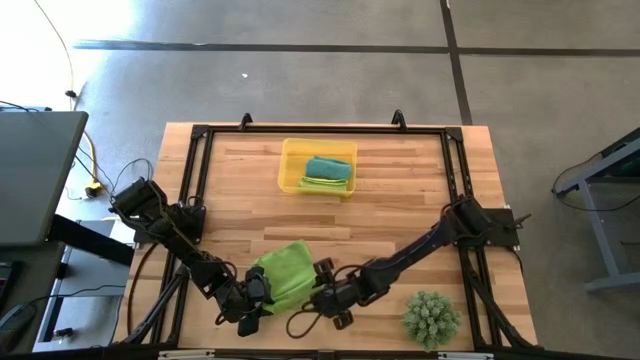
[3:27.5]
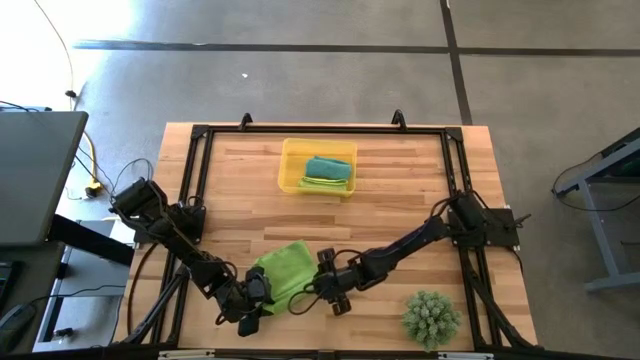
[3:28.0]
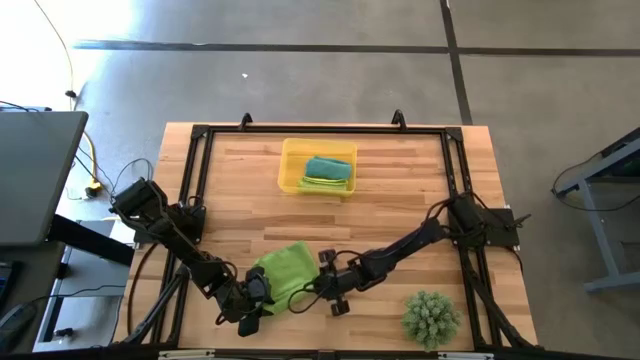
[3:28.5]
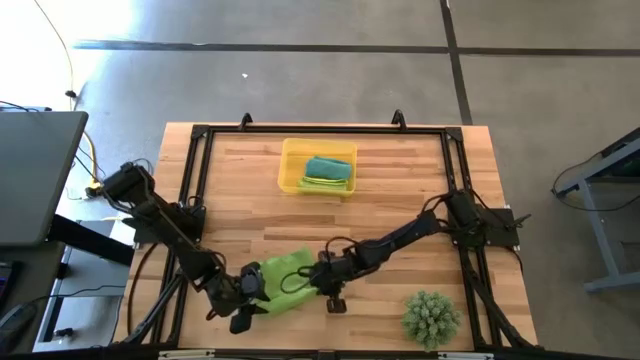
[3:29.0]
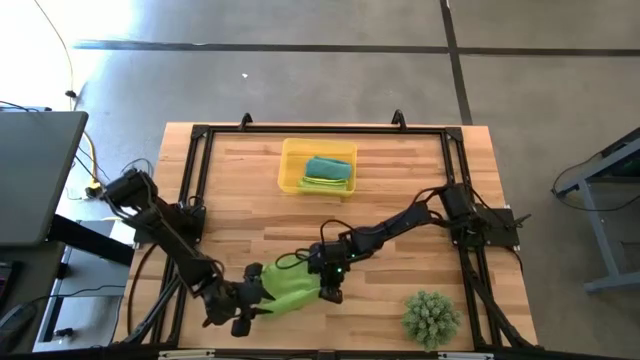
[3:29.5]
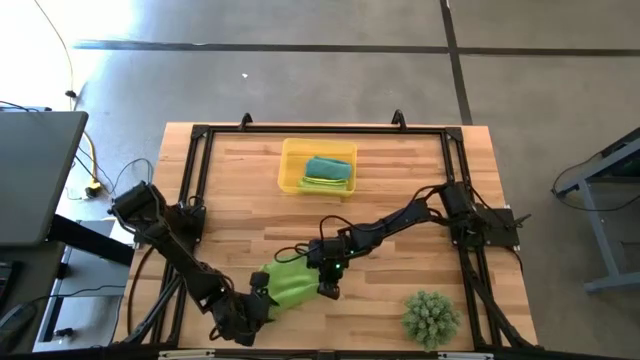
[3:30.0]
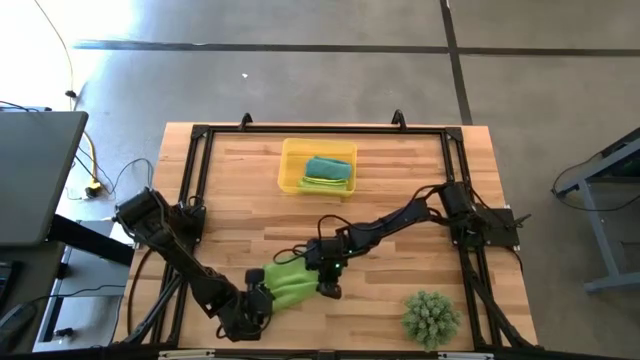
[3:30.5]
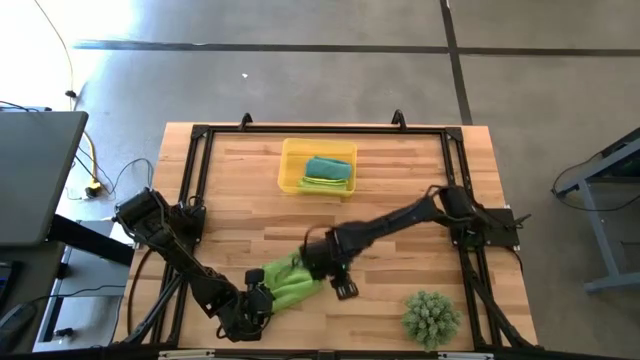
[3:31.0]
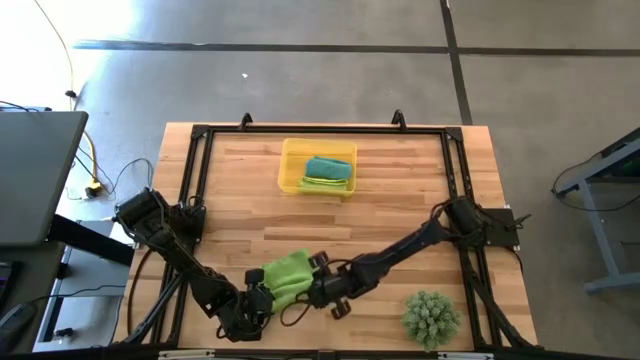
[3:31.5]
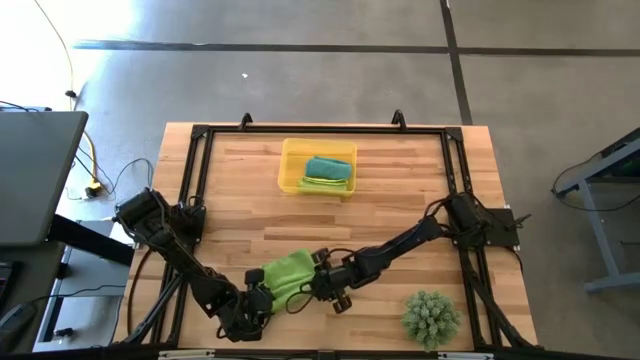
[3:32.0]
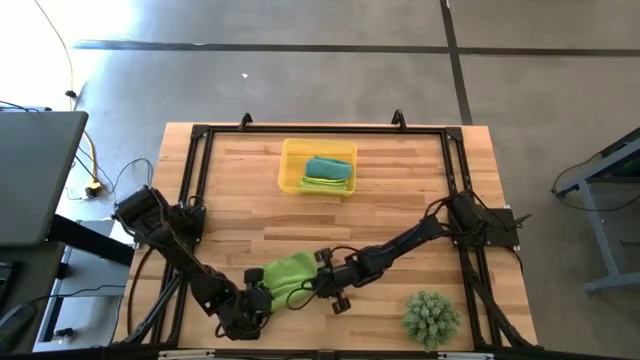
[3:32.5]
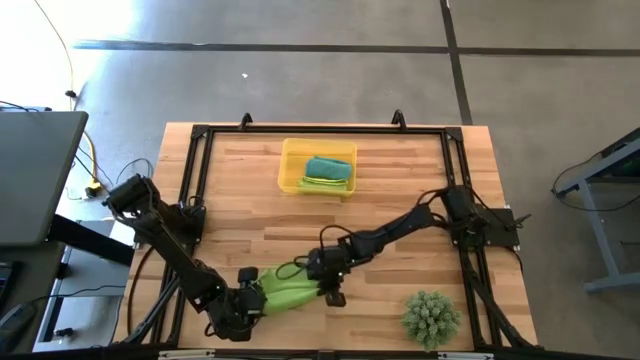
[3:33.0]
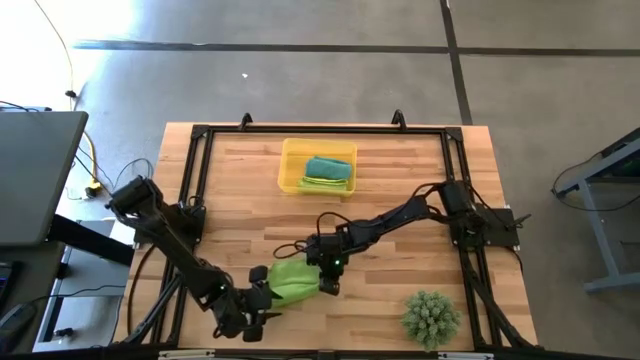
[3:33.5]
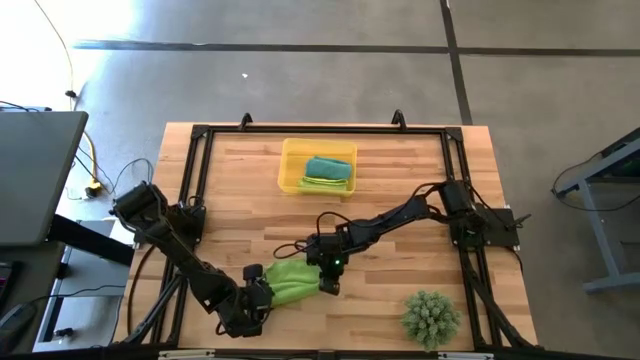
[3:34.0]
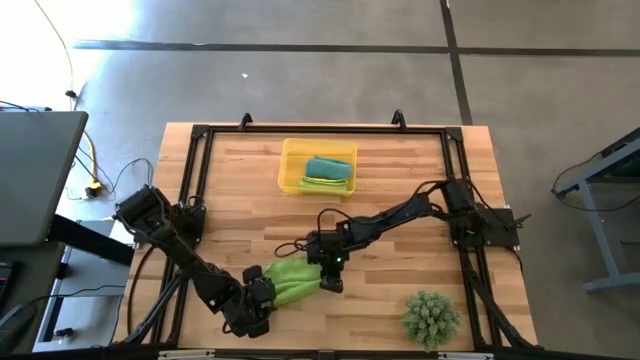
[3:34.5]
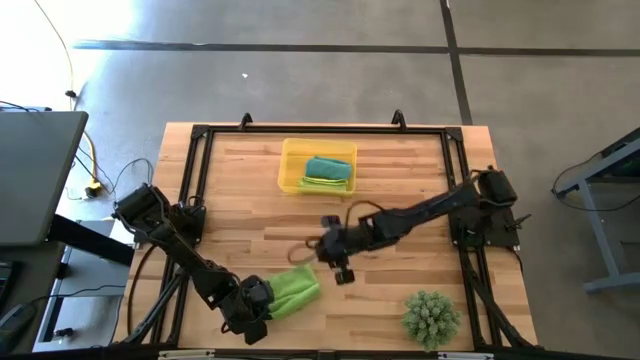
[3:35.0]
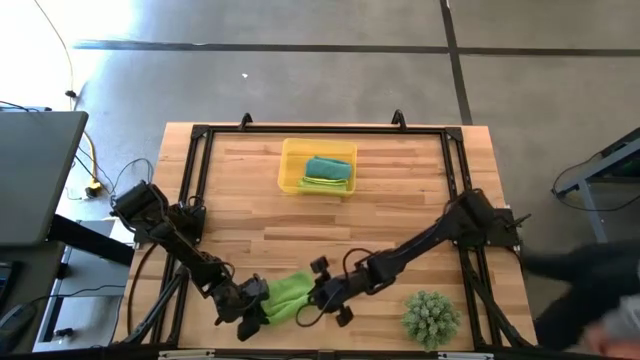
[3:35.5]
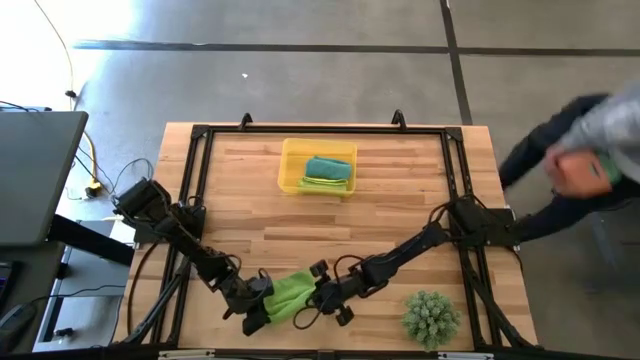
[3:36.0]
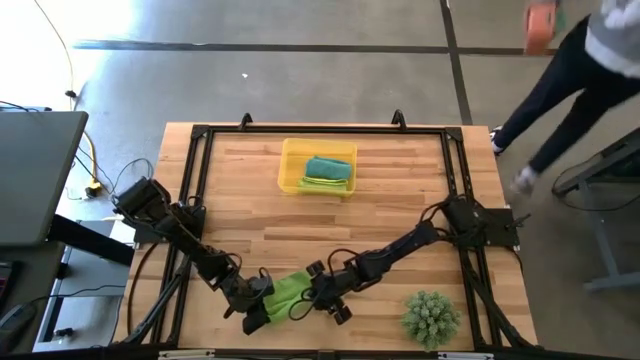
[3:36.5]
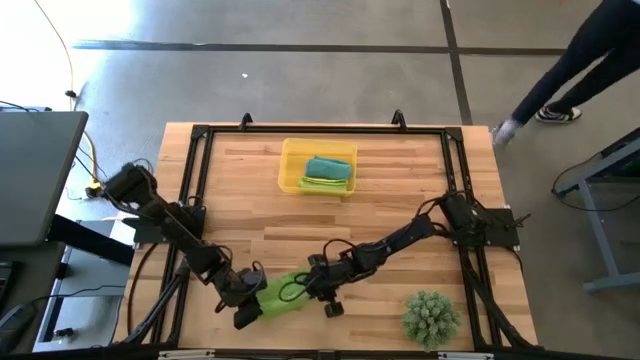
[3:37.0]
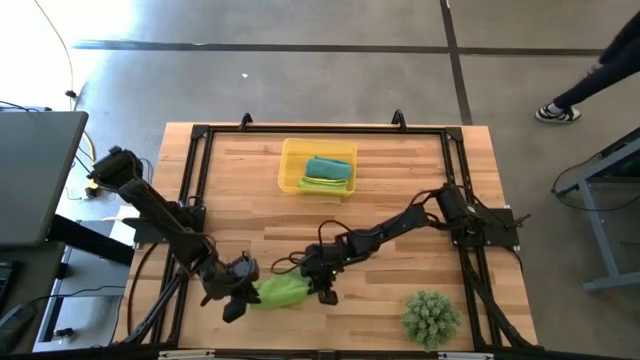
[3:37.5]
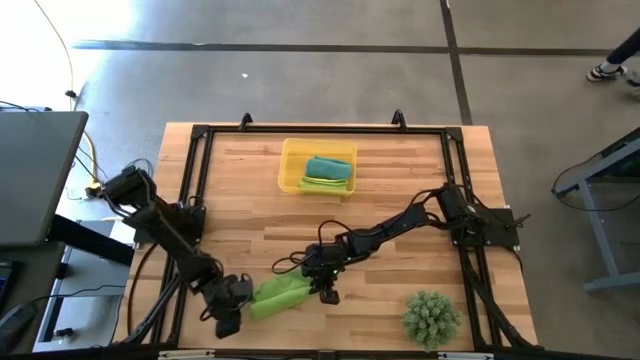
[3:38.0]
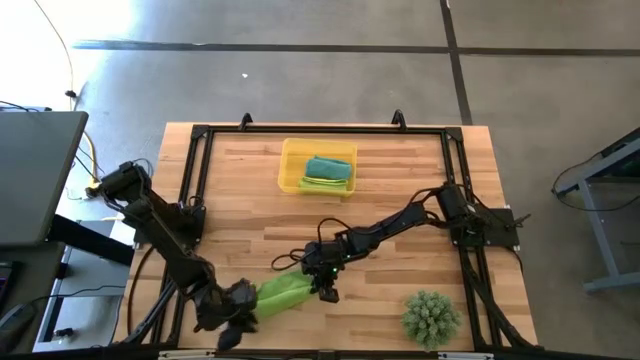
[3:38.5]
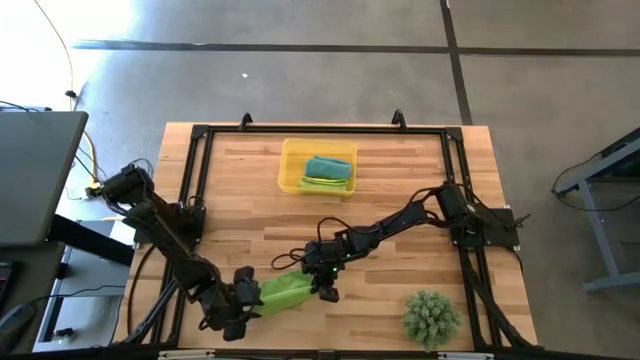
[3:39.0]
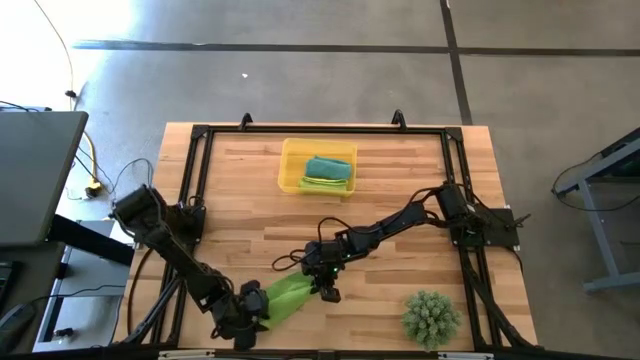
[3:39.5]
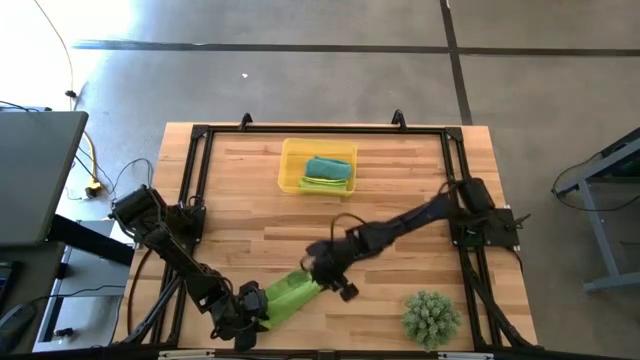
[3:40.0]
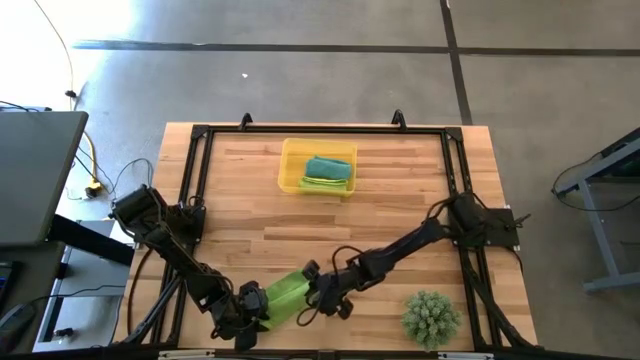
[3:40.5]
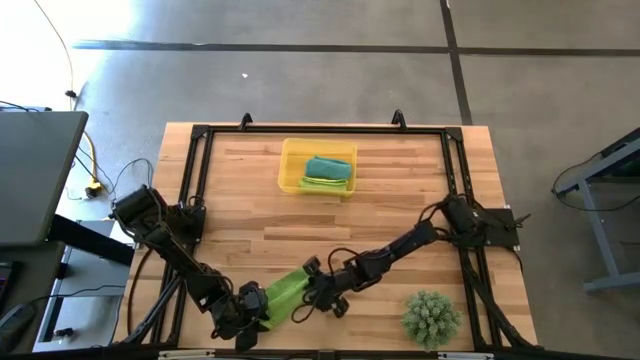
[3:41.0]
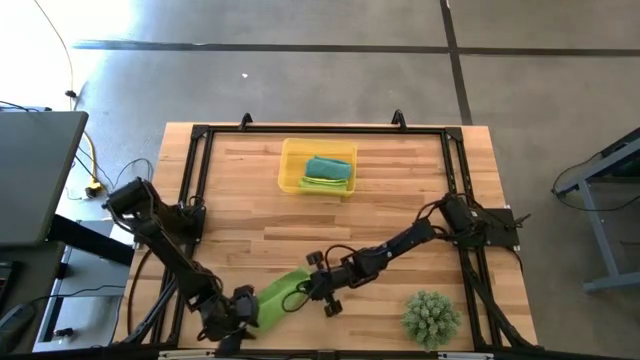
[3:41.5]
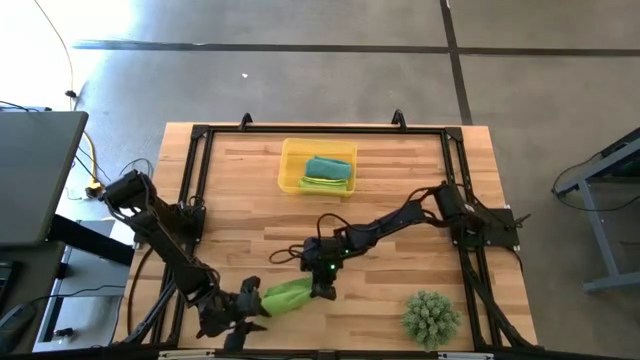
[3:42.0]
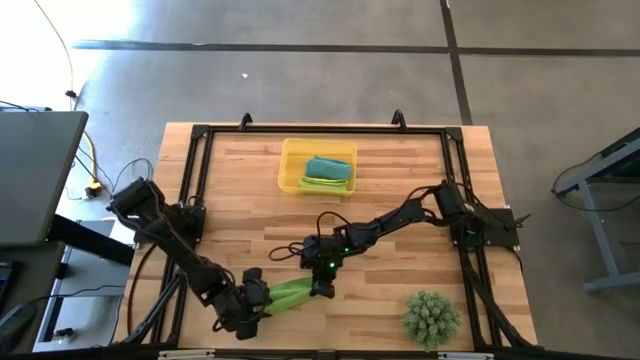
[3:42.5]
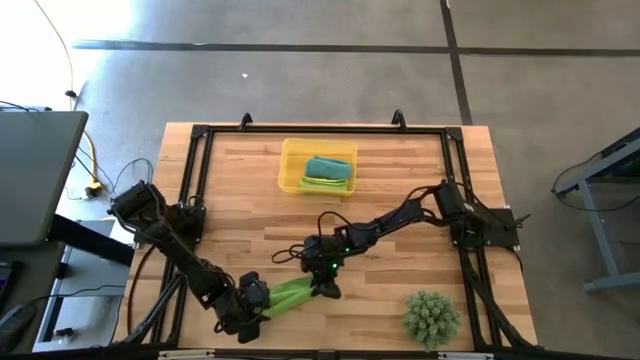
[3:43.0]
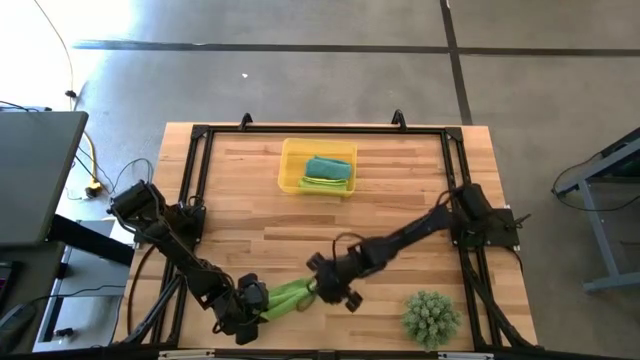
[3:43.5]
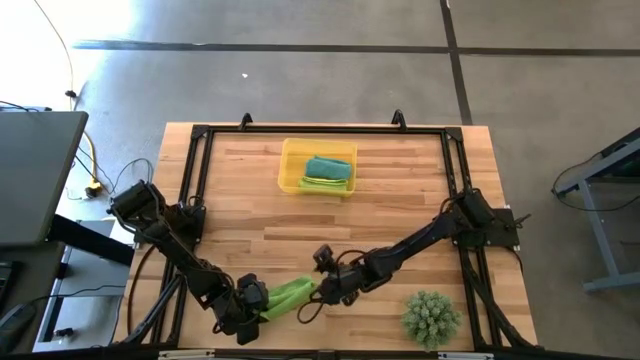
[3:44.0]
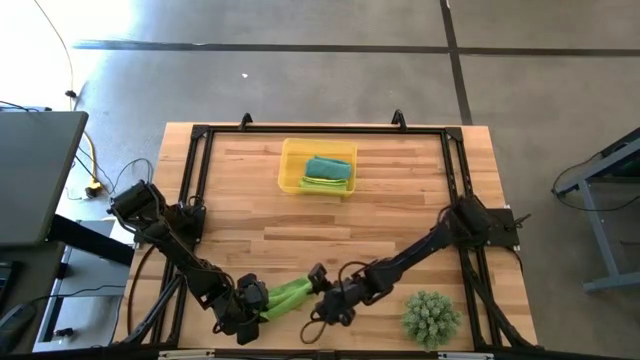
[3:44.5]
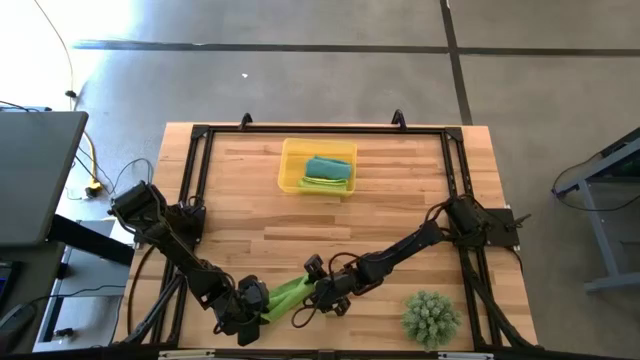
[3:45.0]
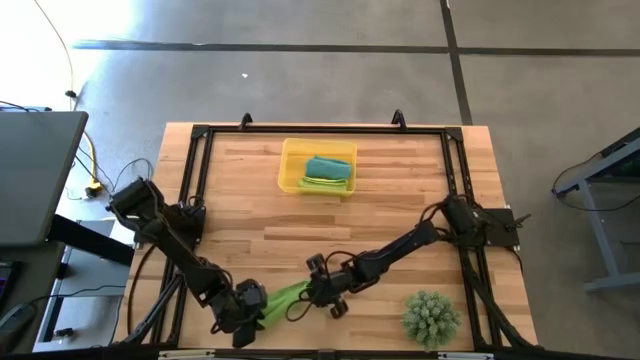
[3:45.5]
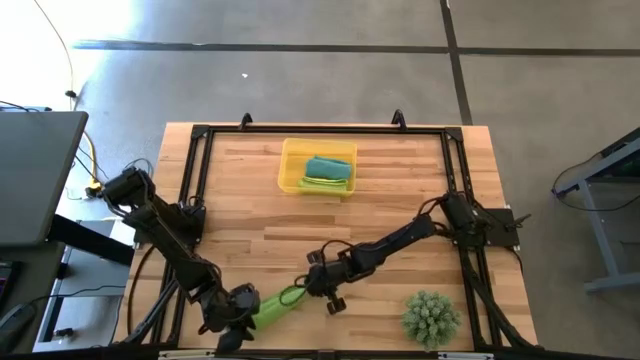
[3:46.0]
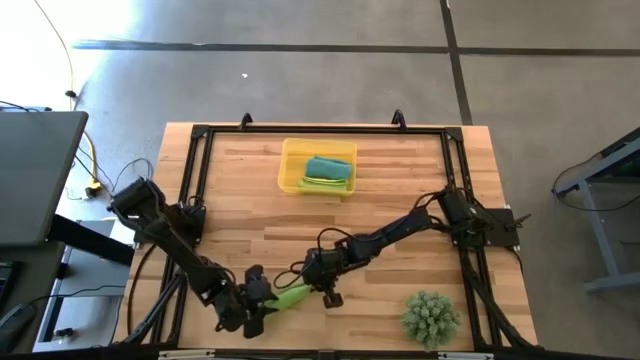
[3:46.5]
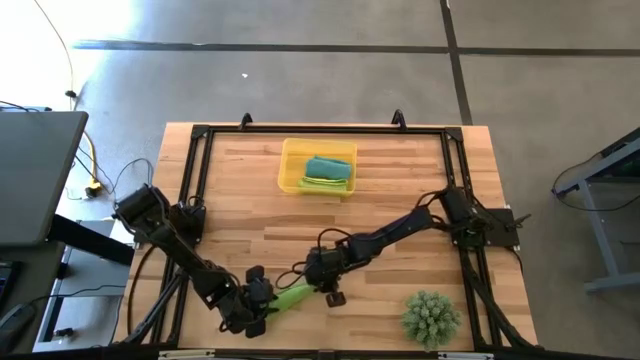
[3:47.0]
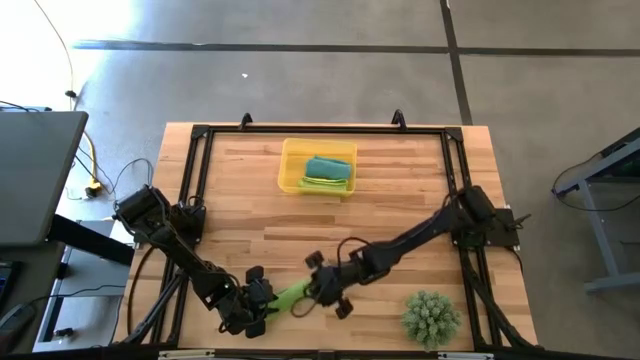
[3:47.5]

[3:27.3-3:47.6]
Task: Roll microfiber towels into tight, uniform cylinder then place into a basket
Roll the green microfiber towel
